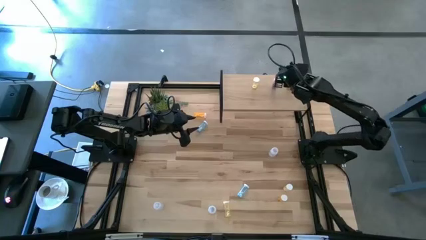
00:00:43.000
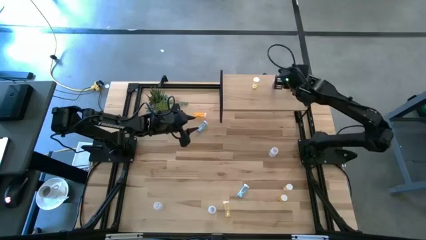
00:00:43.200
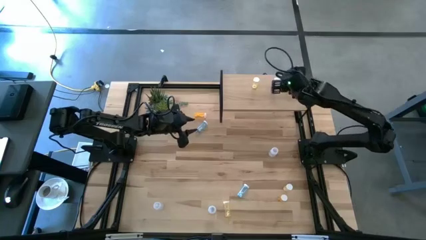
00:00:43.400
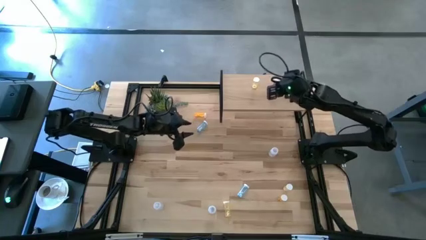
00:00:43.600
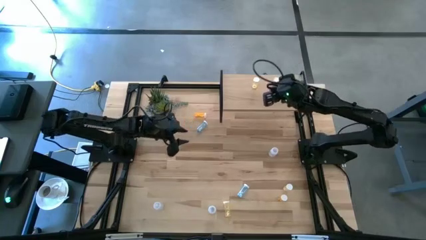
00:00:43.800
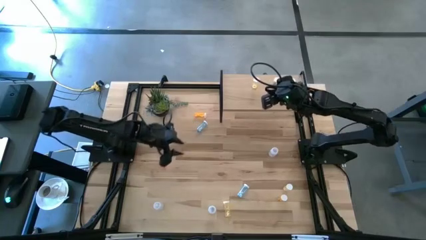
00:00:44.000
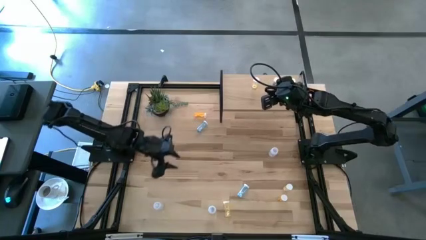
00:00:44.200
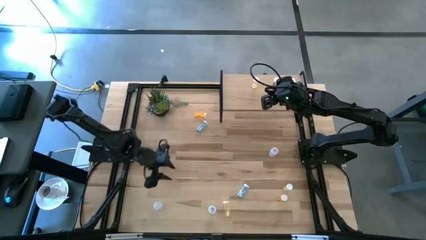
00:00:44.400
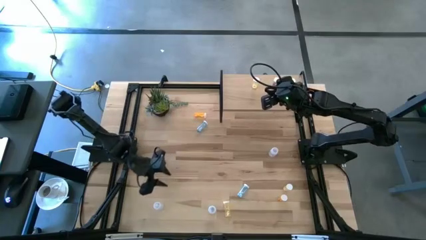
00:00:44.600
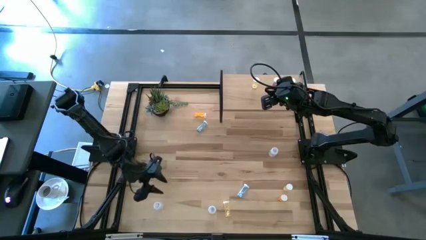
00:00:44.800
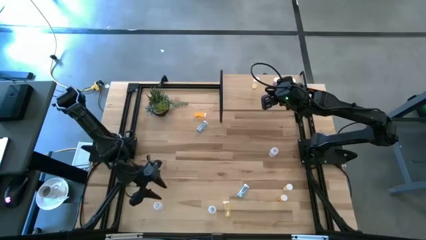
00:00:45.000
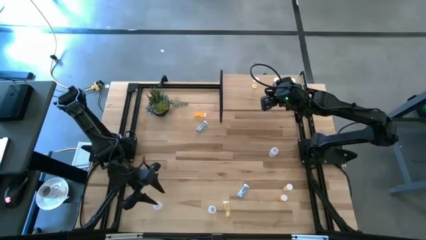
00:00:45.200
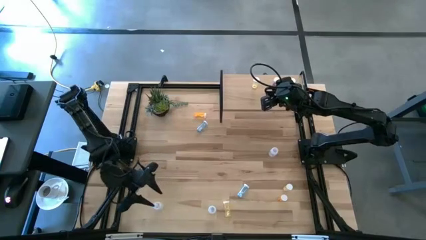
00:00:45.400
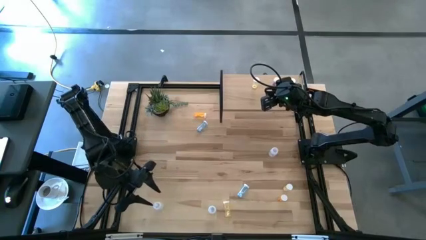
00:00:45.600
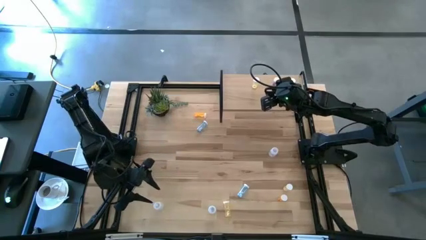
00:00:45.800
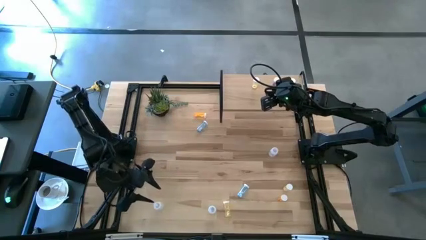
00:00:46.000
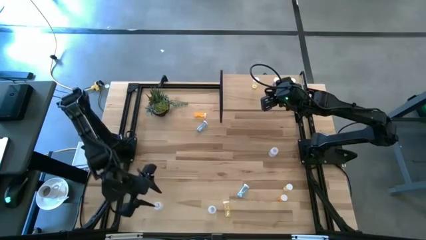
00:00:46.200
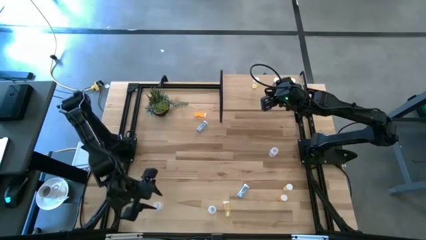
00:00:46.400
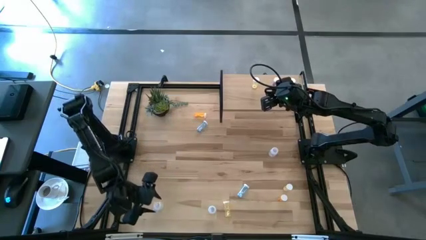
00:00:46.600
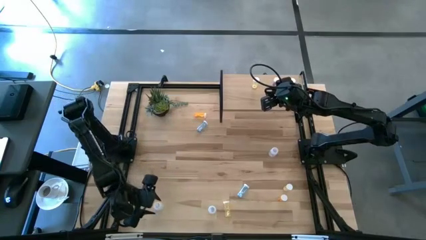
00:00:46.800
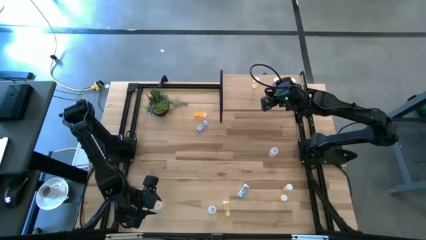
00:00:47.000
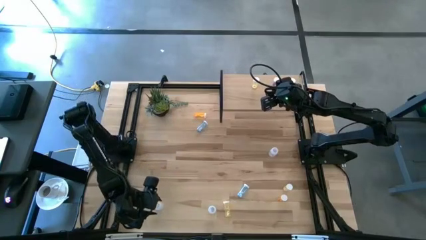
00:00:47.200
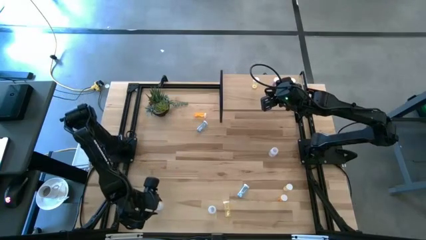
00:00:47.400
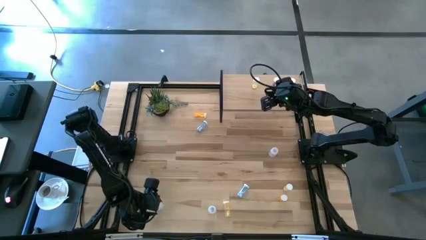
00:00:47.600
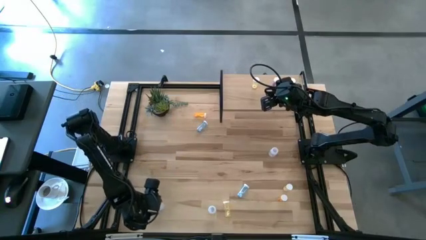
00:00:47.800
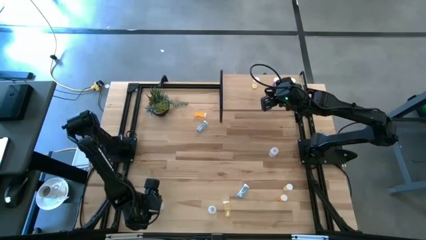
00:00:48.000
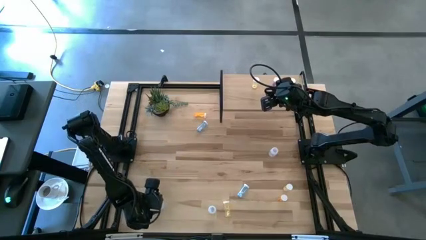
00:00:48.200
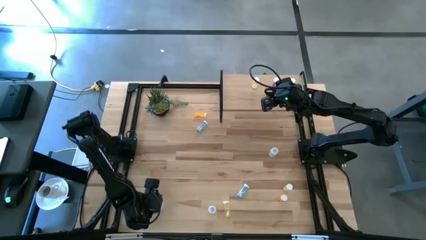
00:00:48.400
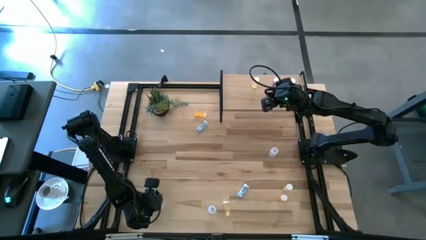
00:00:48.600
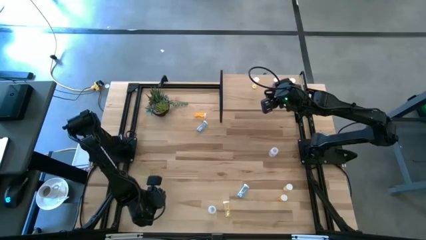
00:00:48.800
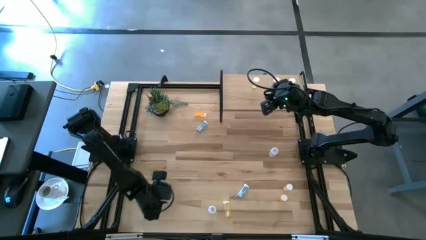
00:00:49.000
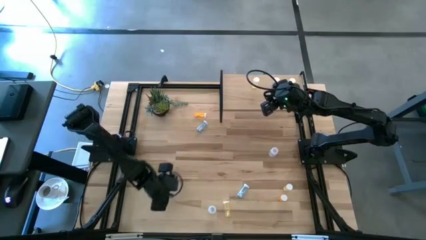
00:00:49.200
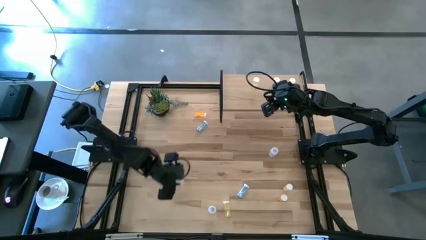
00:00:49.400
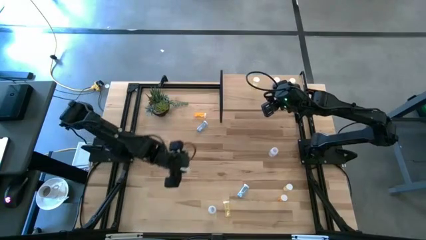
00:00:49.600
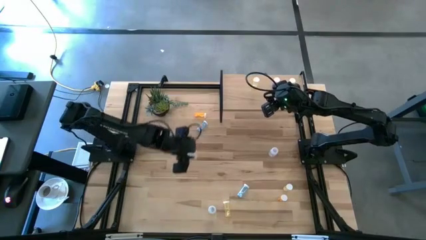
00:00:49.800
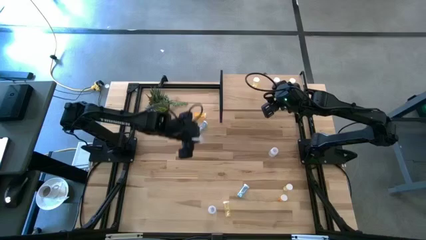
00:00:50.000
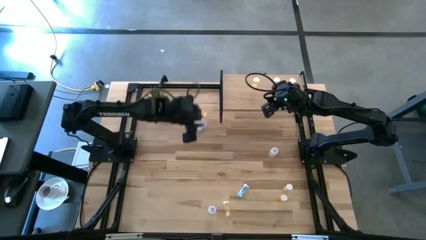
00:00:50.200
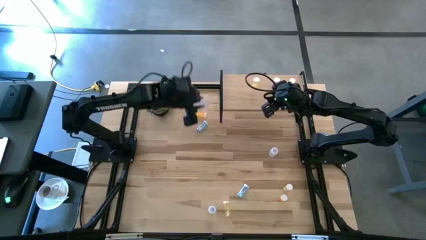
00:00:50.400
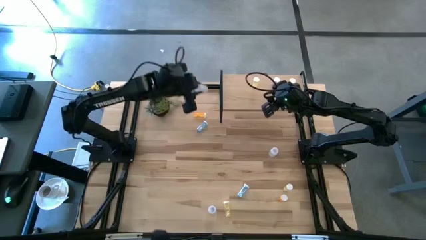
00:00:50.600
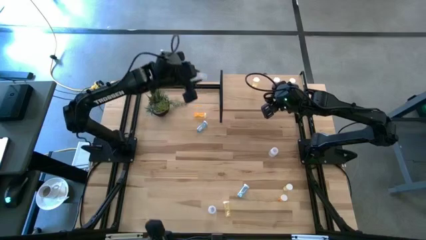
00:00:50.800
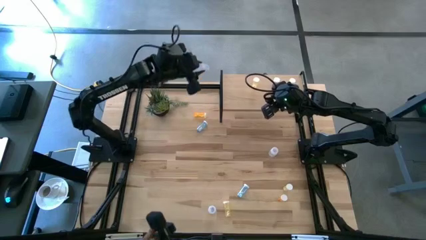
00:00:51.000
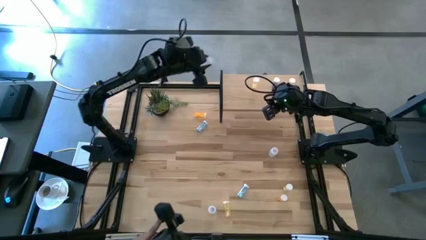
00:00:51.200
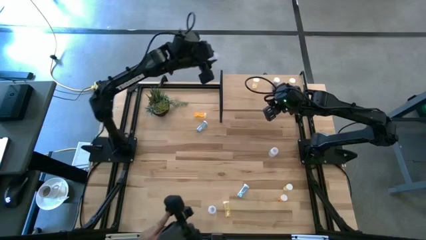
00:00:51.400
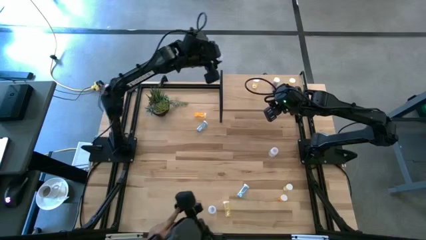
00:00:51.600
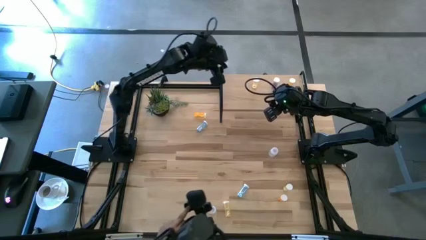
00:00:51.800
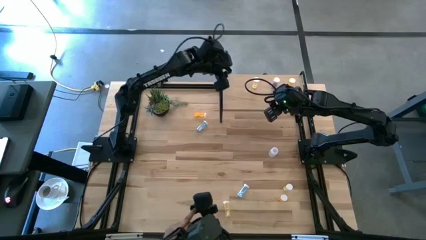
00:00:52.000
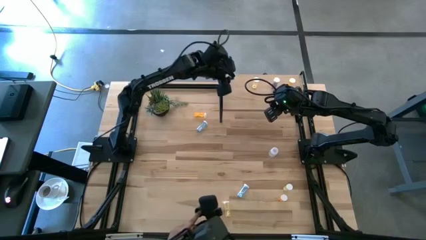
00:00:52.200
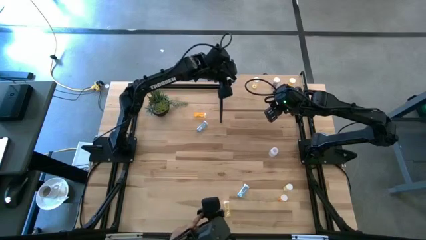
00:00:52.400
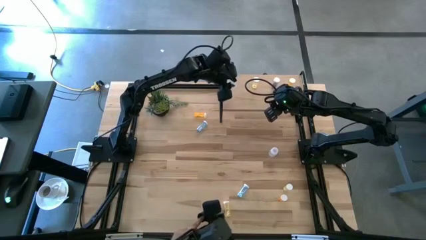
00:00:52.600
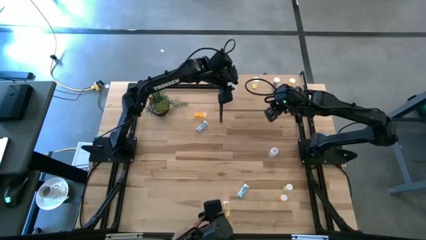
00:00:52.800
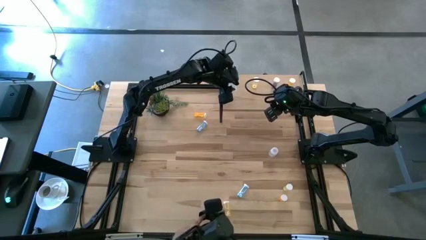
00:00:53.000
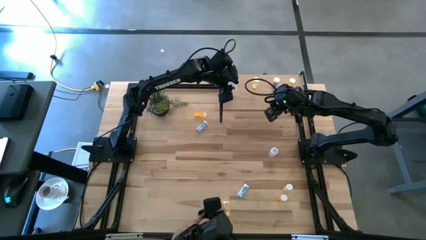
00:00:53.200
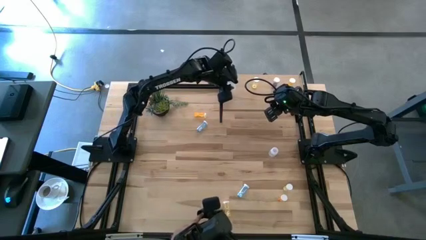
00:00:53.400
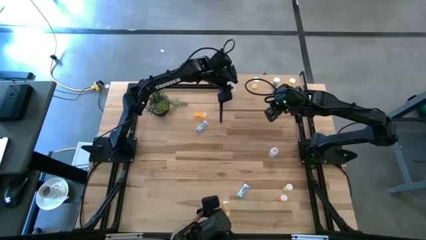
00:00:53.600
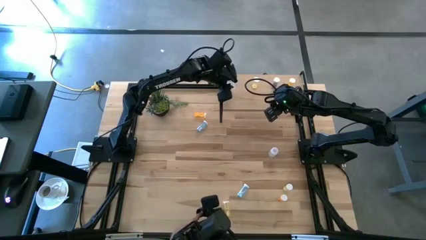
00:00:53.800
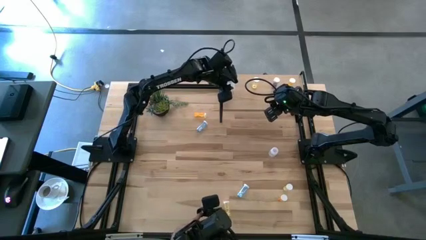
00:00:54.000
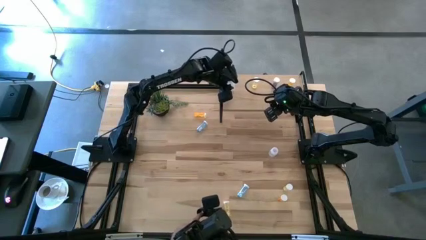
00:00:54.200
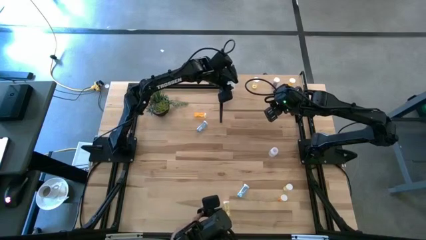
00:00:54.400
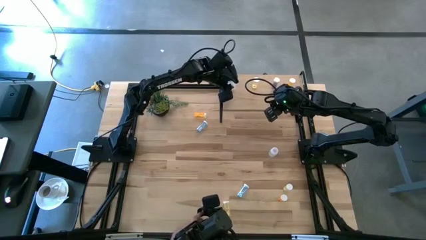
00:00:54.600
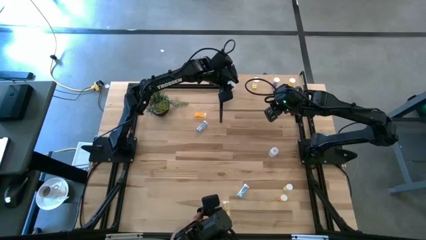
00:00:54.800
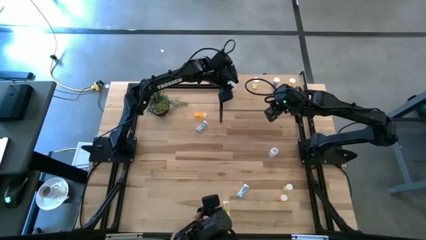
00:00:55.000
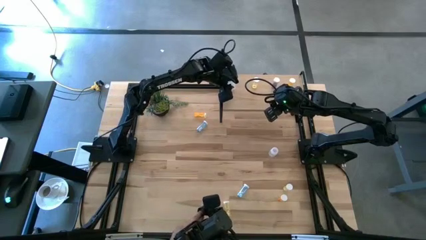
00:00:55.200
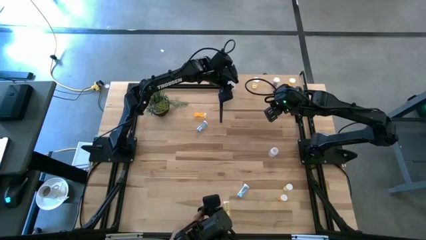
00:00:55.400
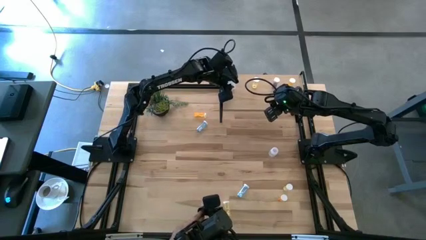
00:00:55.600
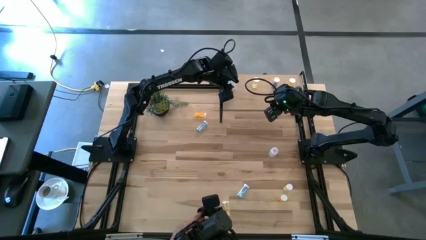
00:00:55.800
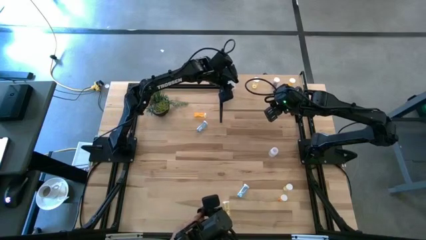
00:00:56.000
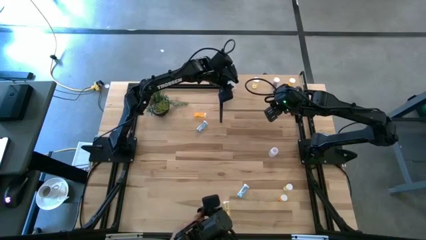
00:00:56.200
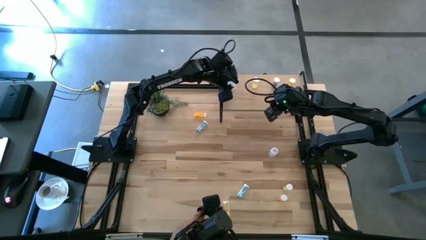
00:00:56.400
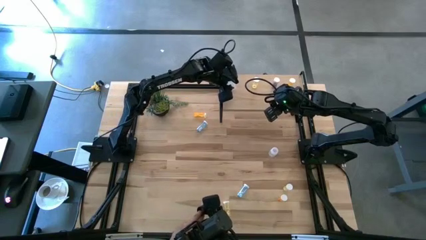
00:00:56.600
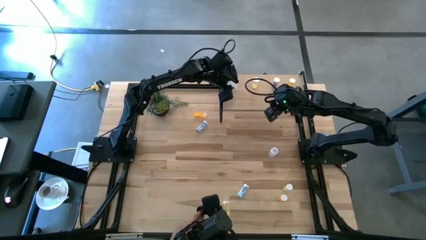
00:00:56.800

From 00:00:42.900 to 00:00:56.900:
Task: Pick and place medicine bottles onto shelf by color
Put the left transparent pill bottle on the shelf

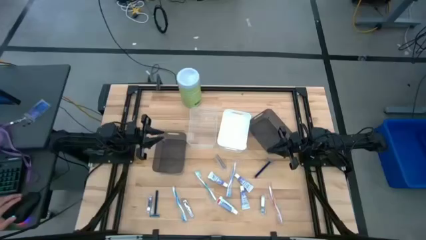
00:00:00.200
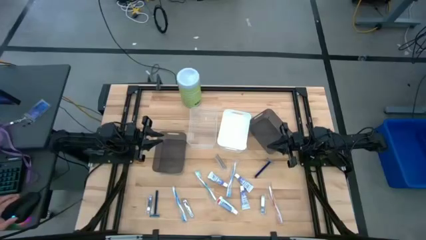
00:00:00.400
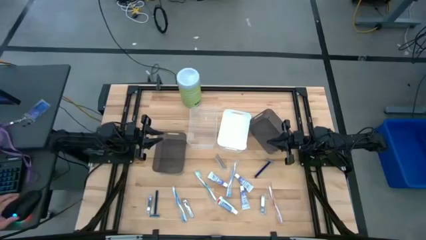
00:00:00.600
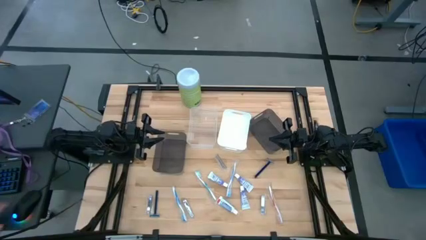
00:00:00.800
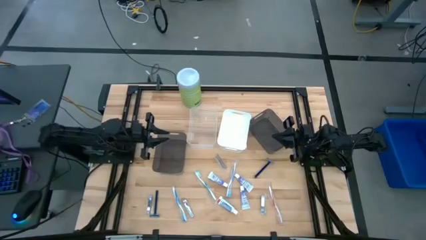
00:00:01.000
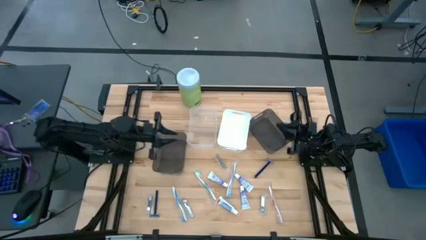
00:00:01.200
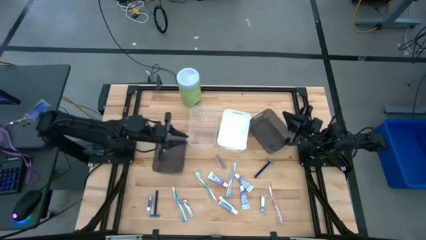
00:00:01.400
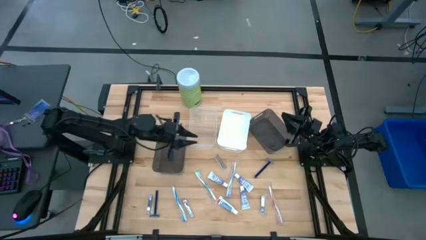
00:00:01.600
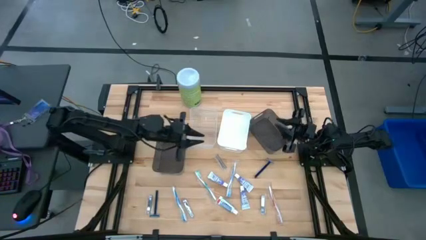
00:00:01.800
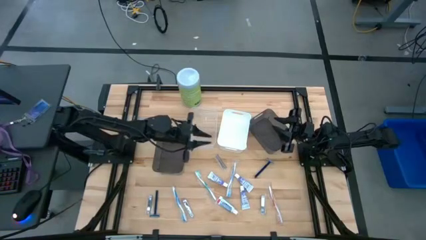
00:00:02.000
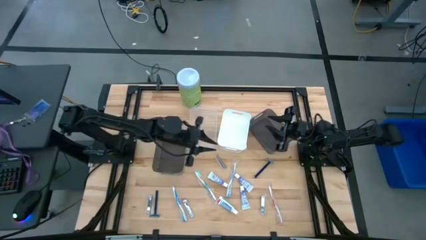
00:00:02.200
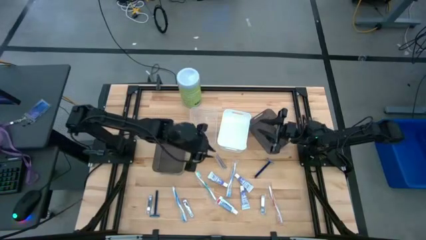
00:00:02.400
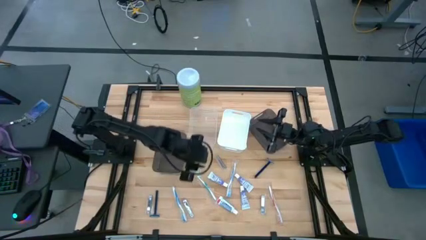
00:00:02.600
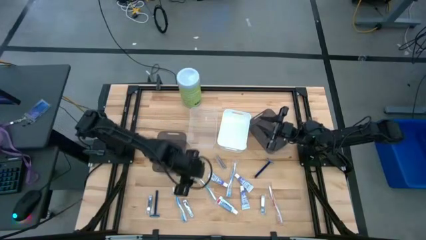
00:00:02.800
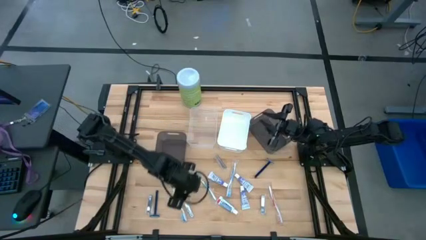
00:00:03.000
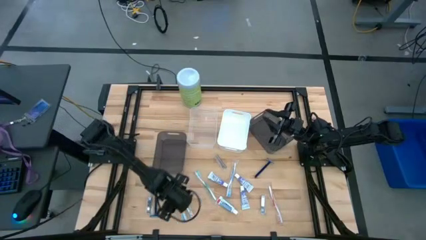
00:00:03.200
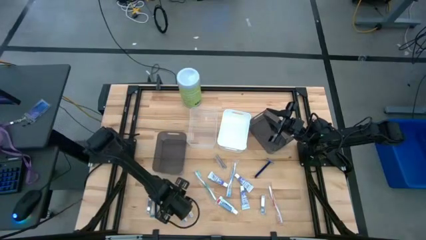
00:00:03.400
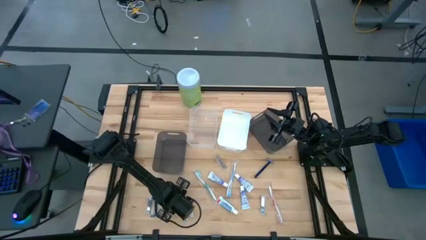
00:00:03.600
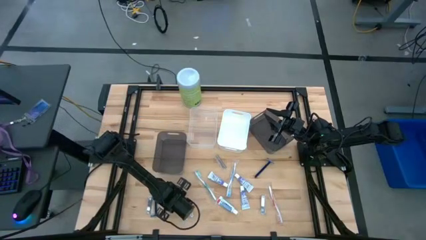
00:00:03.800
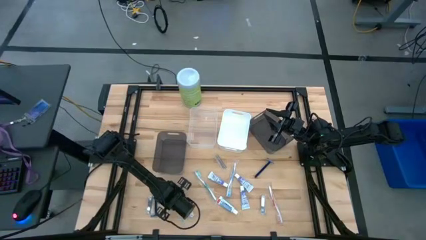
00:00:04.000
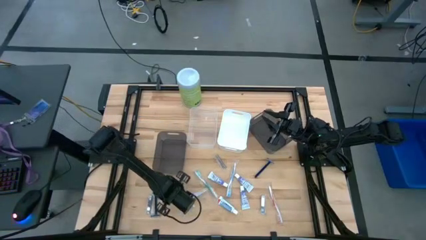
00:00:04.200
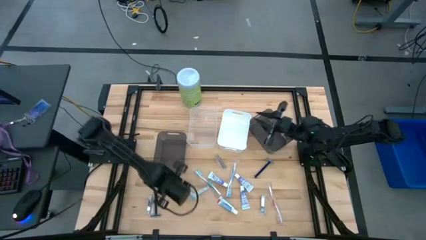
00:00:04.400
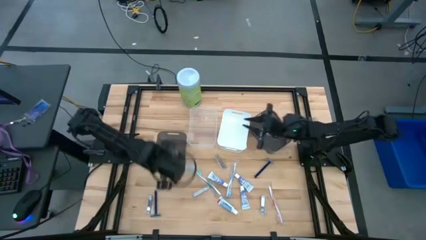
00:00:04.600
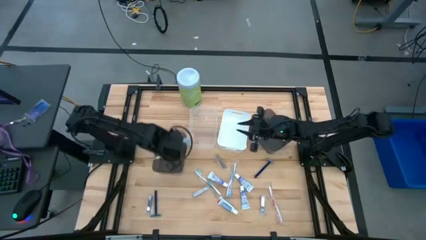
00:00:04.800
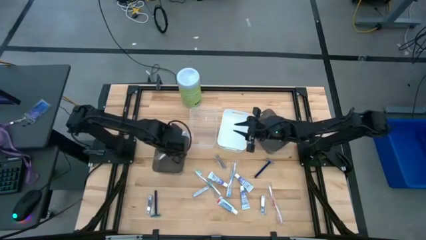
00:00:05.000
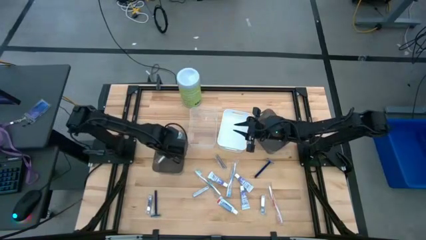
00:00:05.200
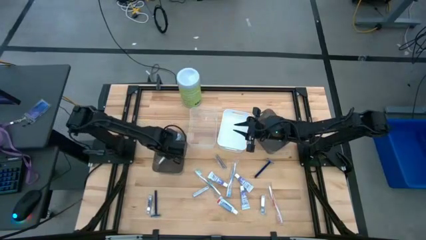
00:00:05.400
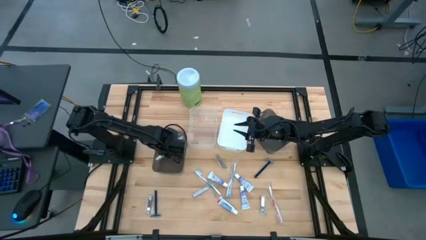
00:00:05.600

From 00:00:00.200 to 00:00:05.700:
Task: Pick & Place Travel size toiletries
Put the blue toothbrush into the left black bin
